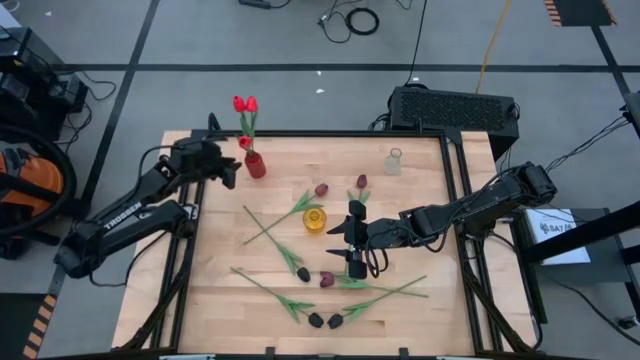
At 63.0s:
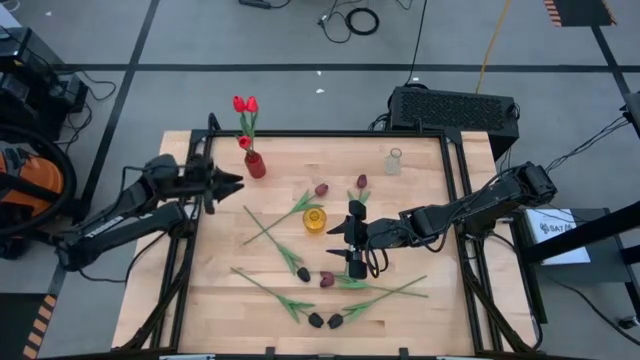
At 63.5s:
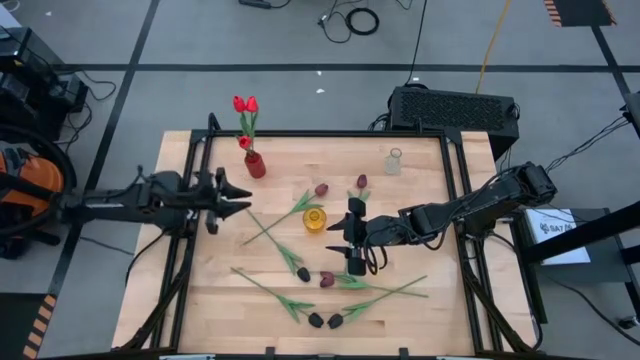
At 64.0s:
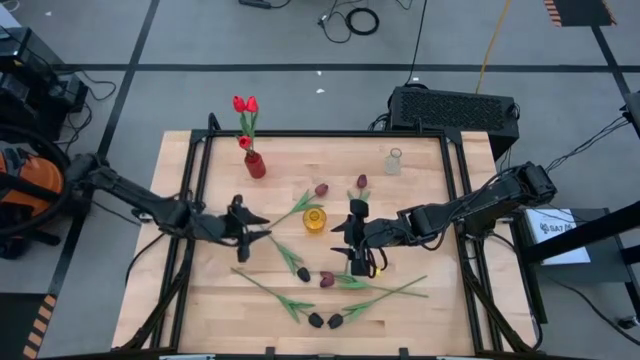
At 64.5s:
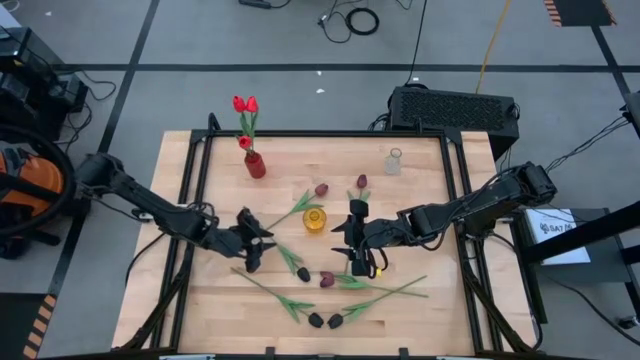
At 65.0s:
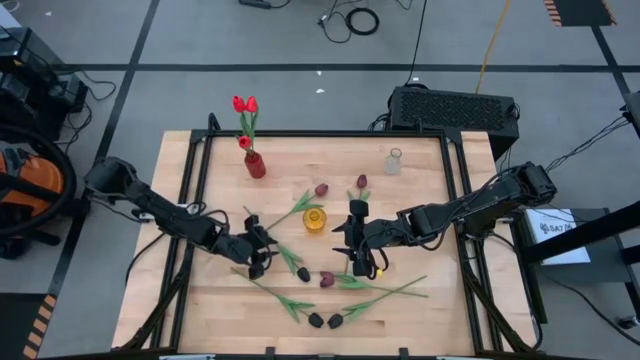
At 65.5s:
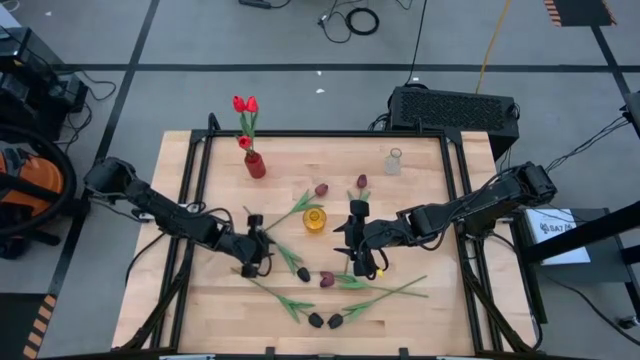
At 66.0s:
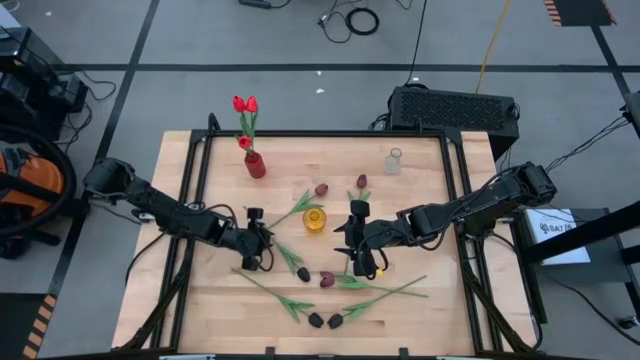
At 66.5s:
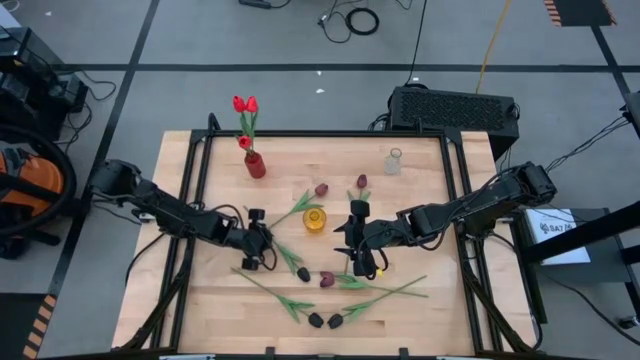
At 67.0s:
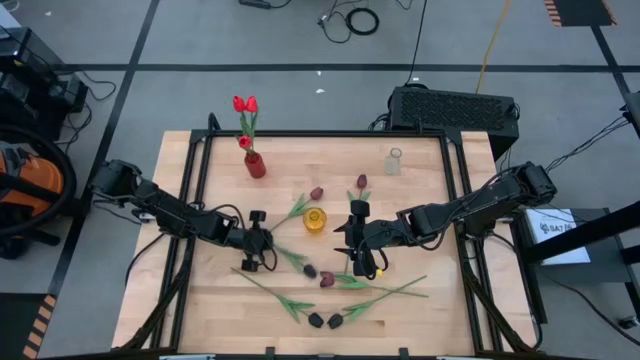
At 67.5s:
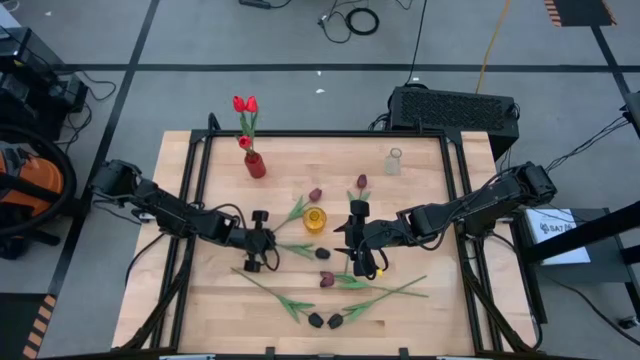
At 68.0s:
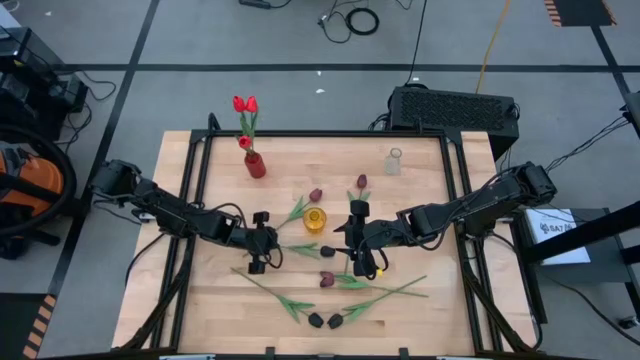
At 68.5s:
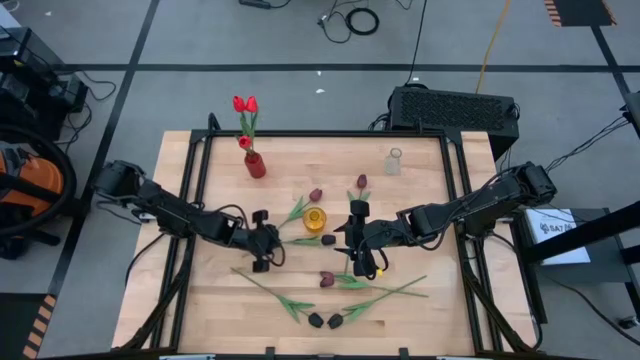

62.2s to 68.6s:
Task: Sort flowers into vase by color
Put the top black flower into the yellow vase

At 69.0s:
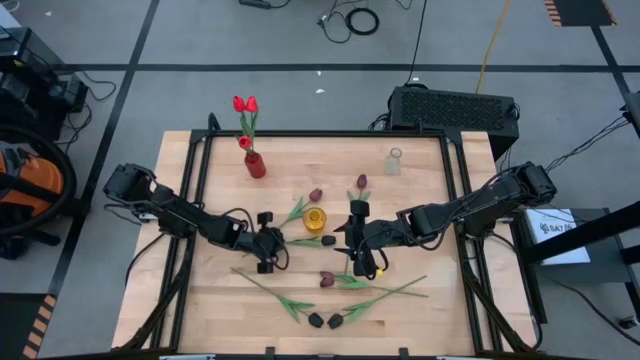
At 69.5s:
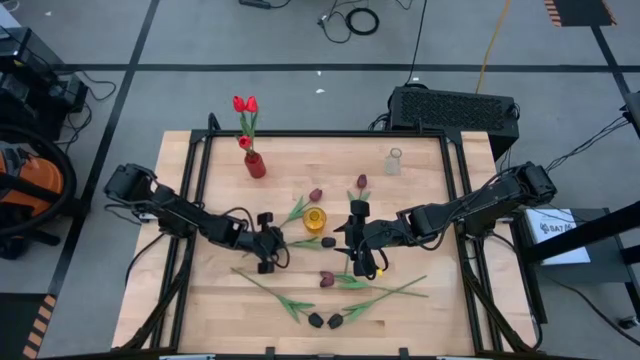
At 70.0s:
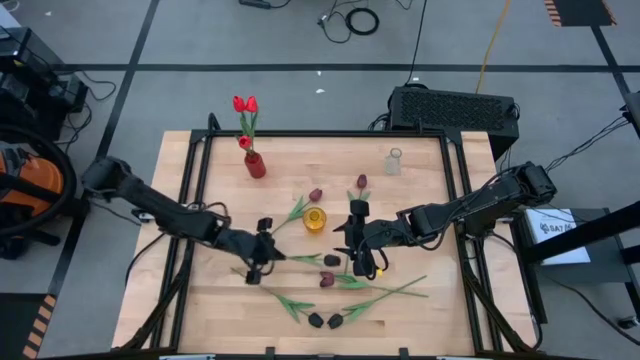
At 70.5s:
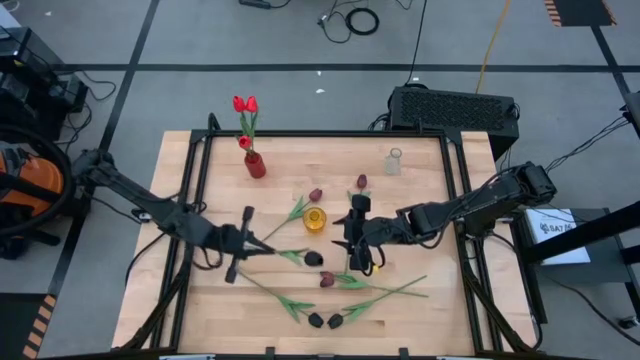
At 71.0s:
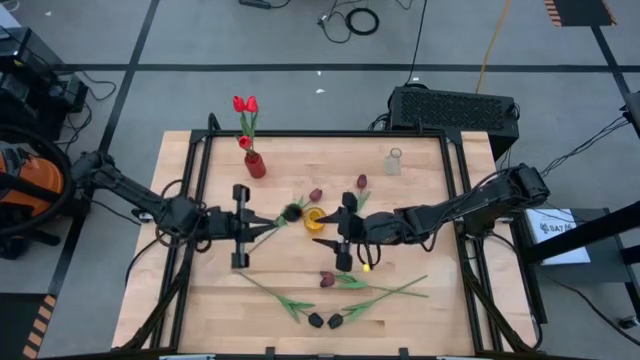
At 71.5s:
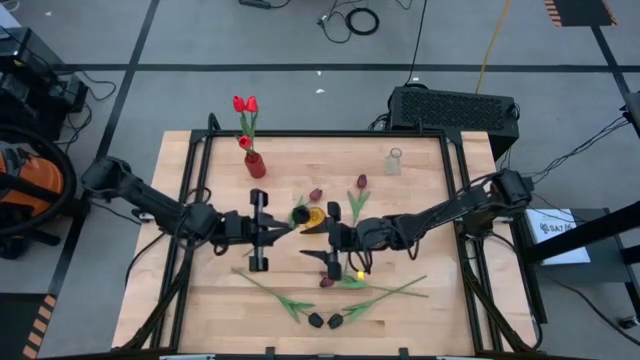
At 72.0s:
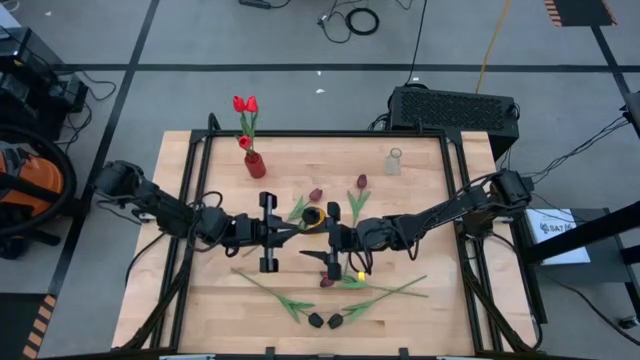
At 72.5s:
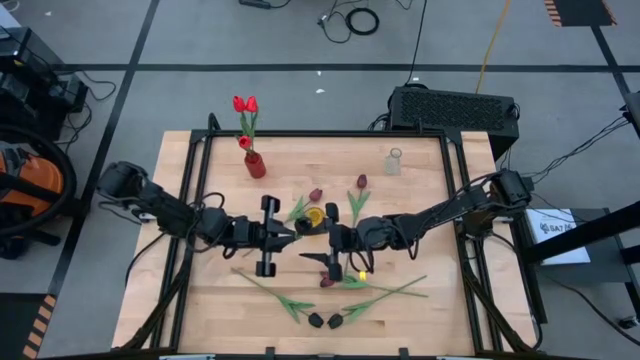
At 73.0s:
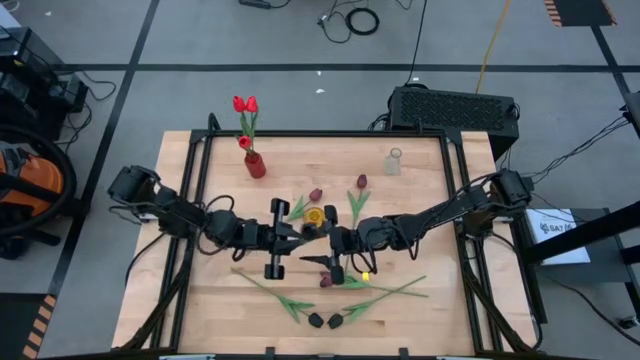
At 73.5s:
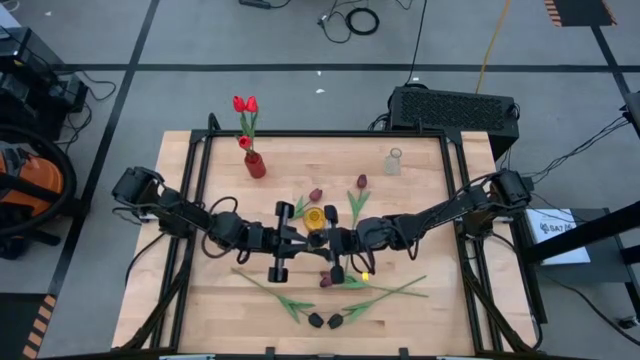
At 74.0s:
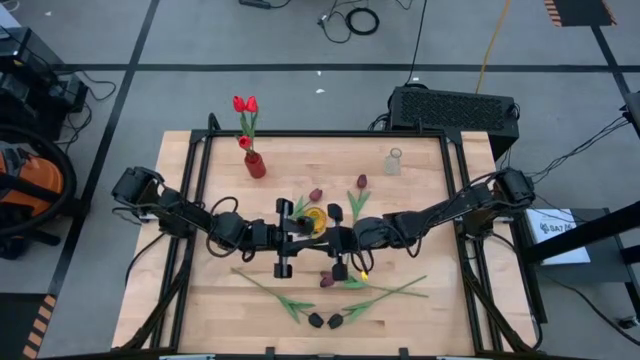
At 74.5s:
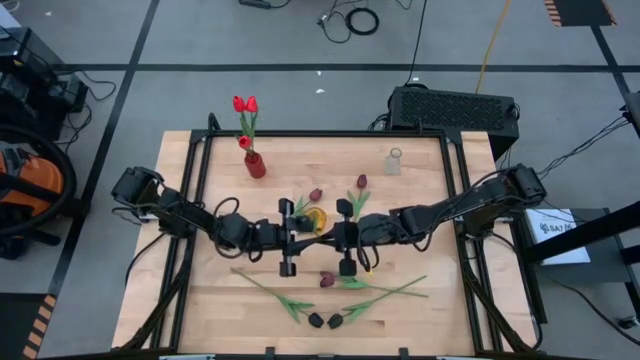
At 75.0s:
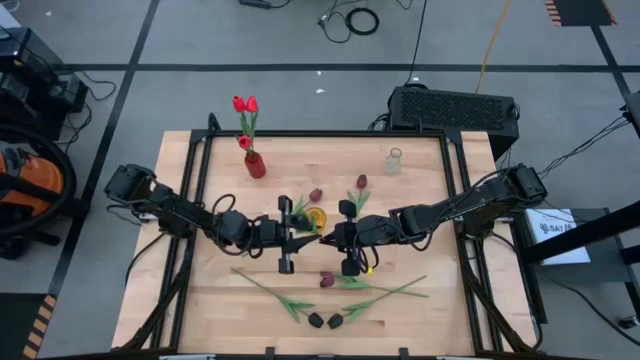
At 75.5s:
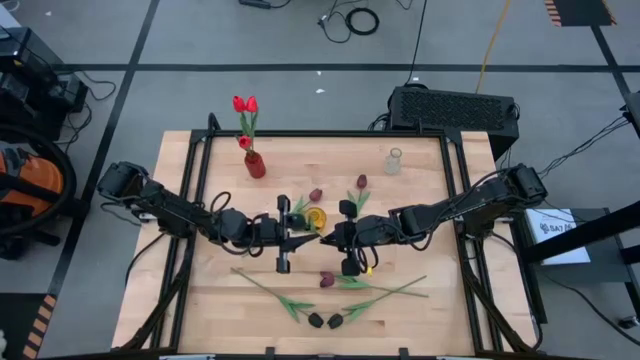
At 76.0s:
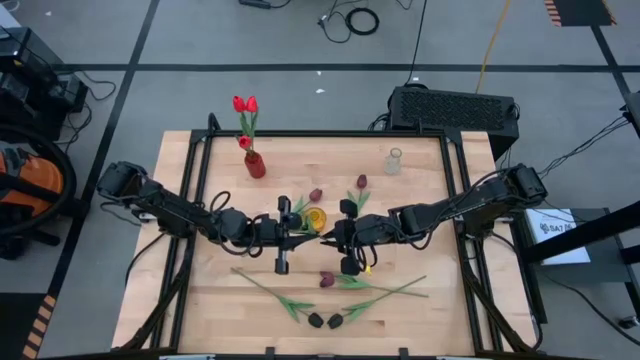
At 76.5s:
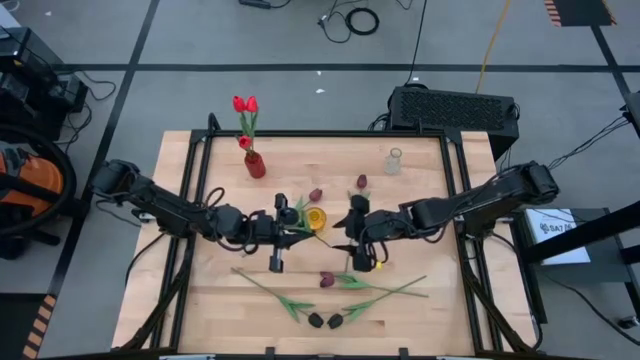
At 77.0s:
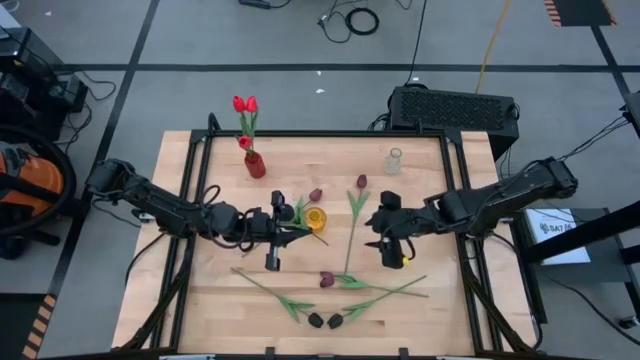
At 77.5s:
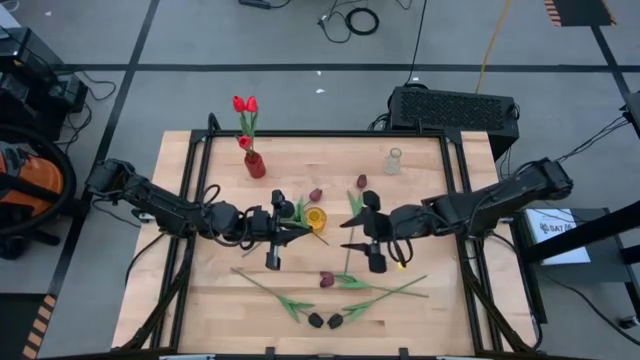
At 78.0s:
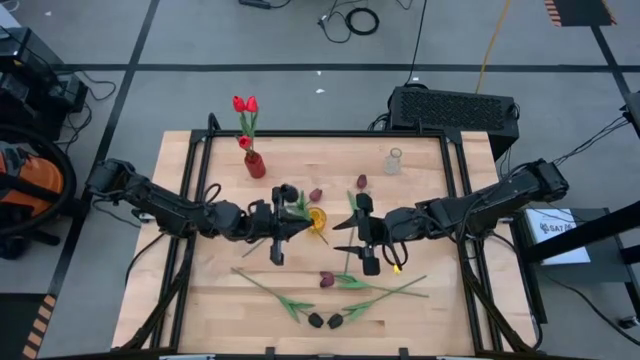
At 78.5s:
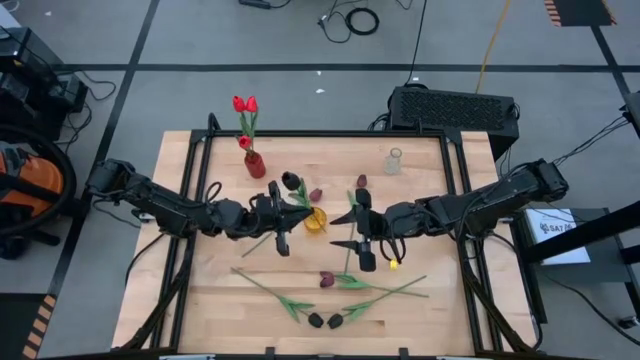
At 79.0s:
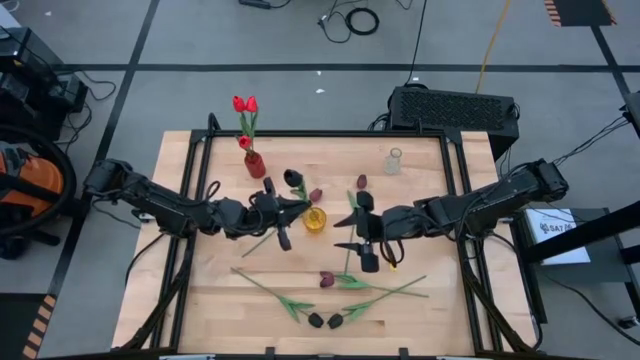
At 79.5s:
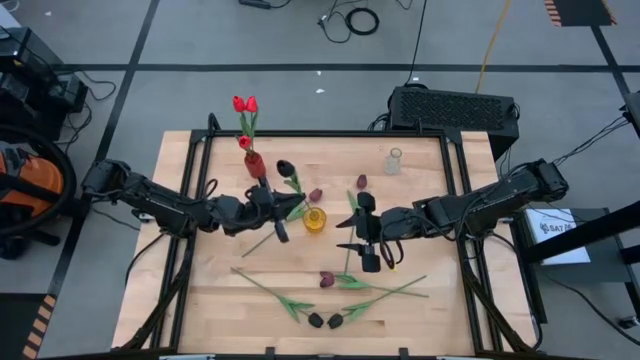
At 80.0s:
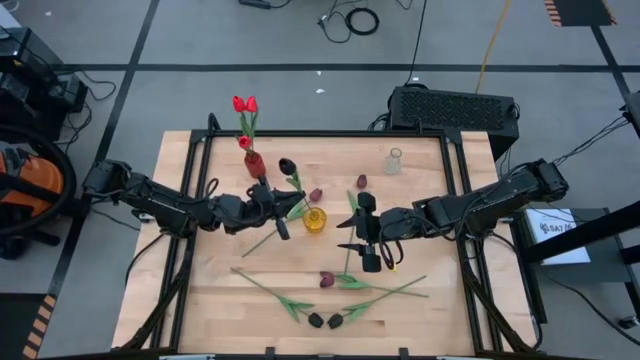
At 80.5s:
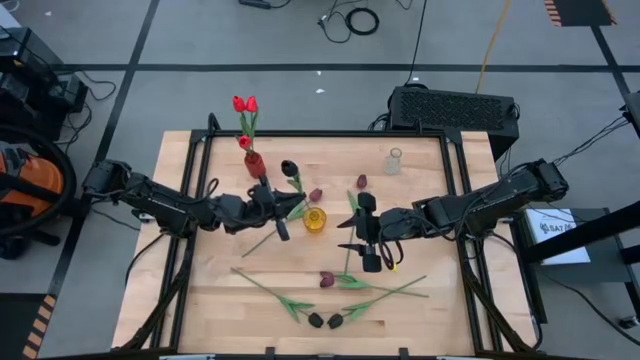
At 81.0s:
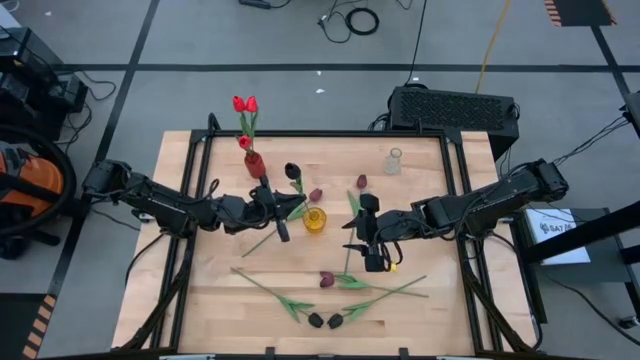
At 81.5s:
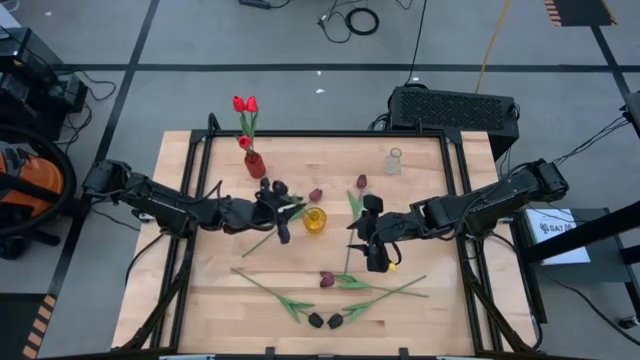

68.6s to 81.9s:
Put the top black flower into the yellow vase

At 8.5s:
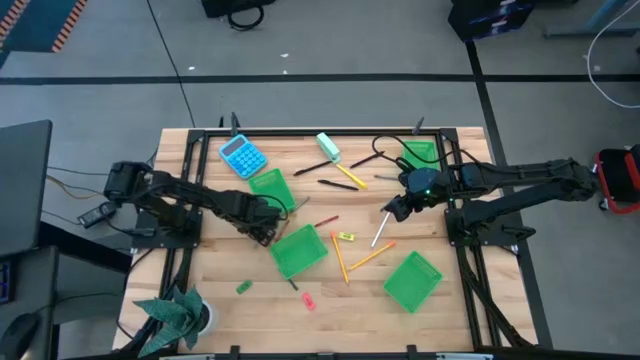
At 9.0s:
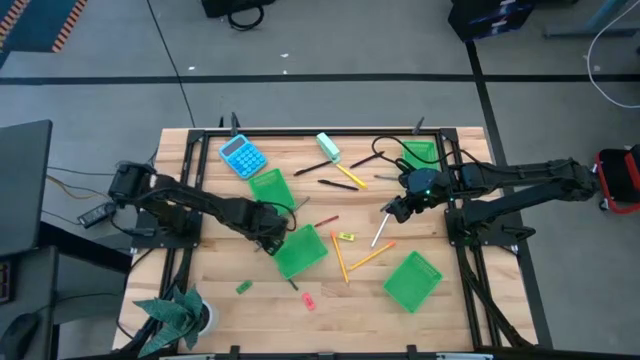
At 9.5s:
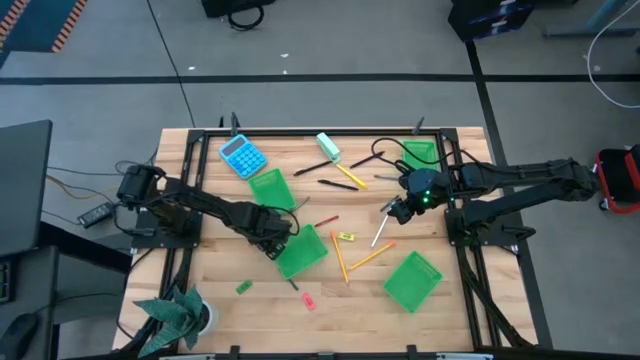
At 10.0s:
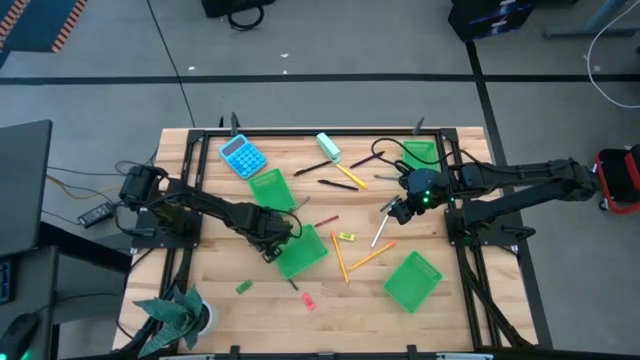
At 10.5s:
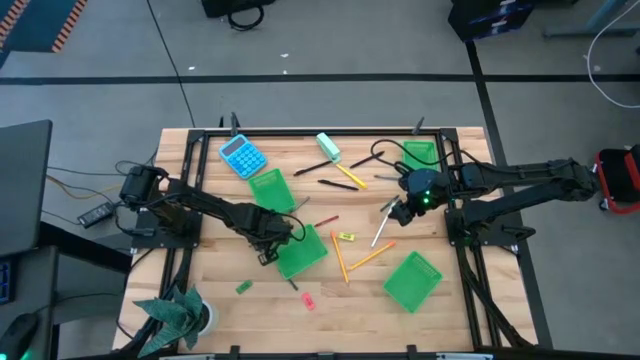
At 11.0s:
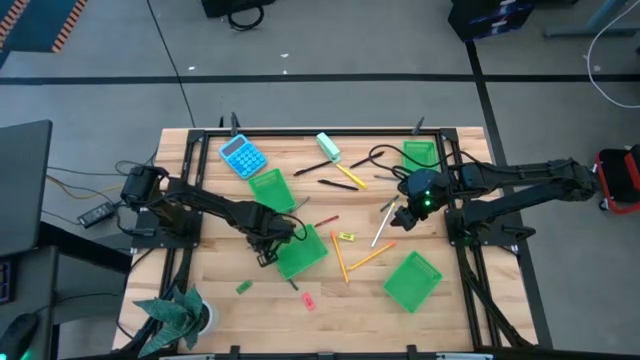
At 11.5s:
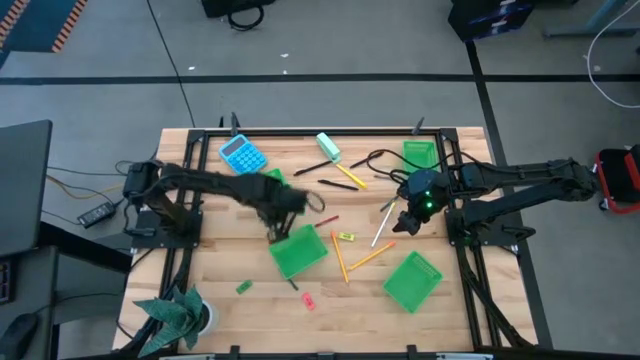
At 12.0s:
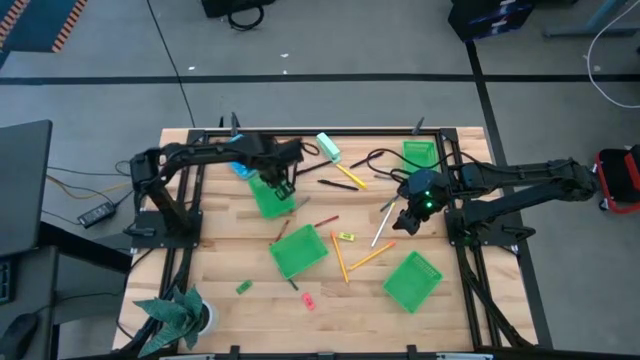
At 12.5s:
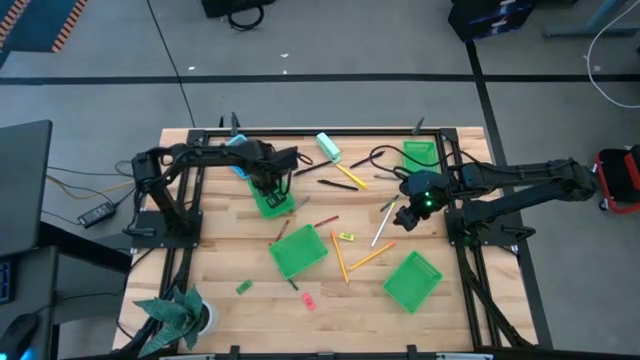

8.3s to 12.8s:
Task: Sort crayons/erasers/pens/pencils in bins
Put the bottom gray crayon into the top left green bin
